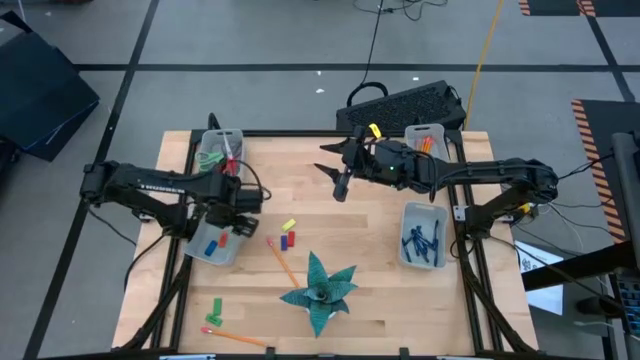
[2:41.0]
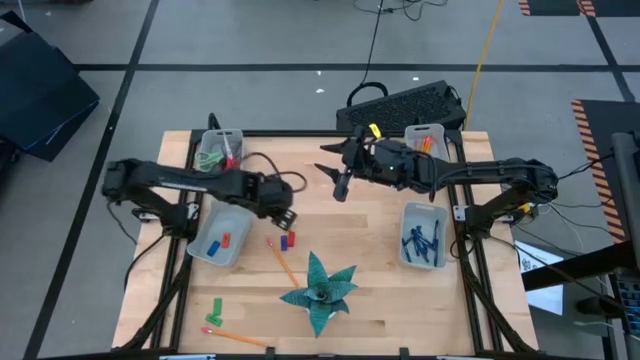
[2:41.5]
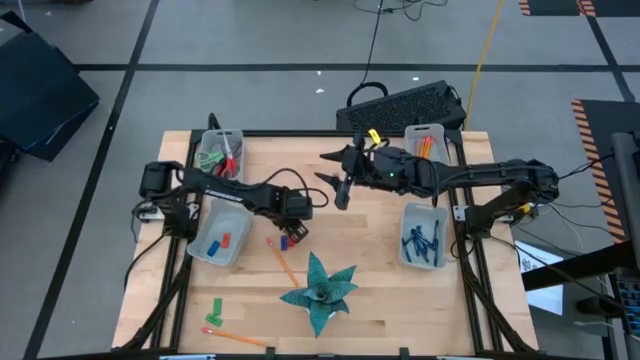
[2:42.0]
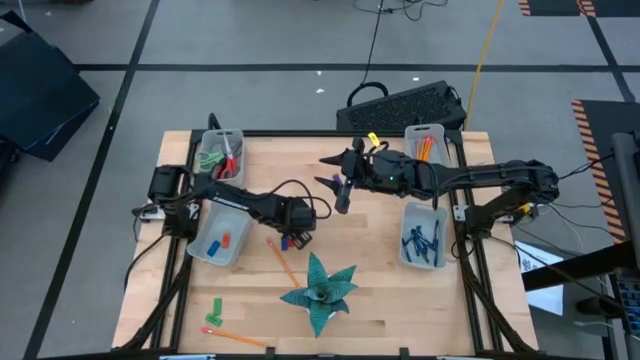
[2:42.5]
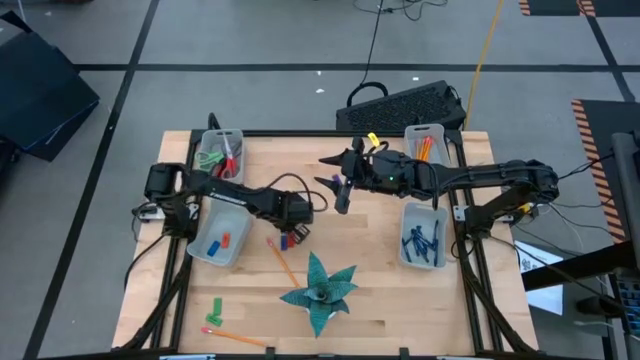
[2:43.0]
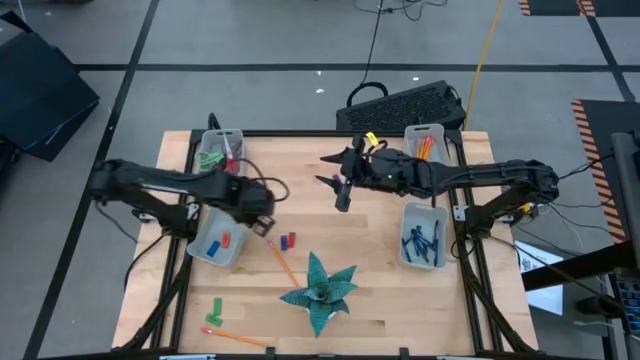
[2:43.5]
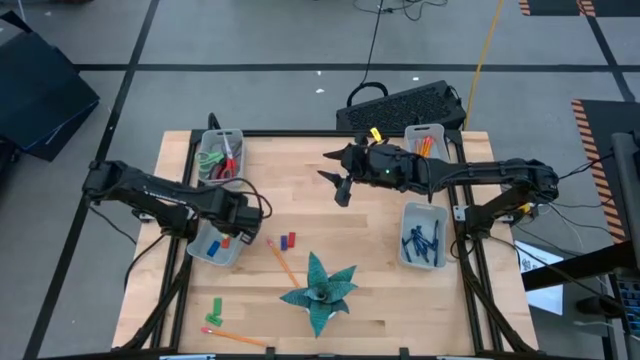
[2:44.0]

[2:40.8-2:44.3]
Task: Sort crayons/erasers/pens/pencils in bins
Put the light green eraser into the bottom left gray bin

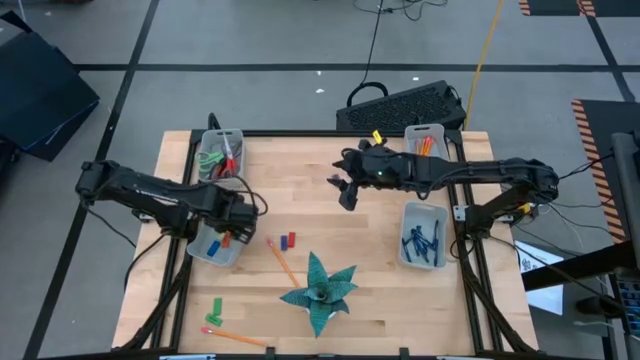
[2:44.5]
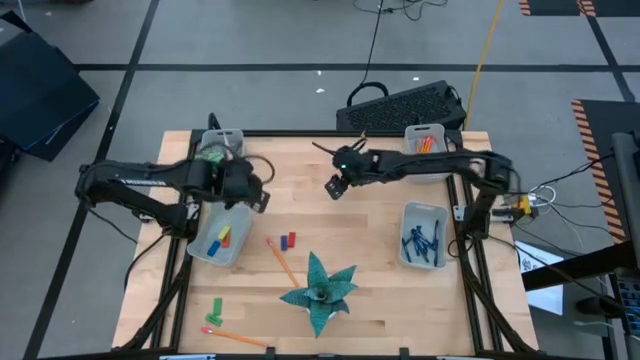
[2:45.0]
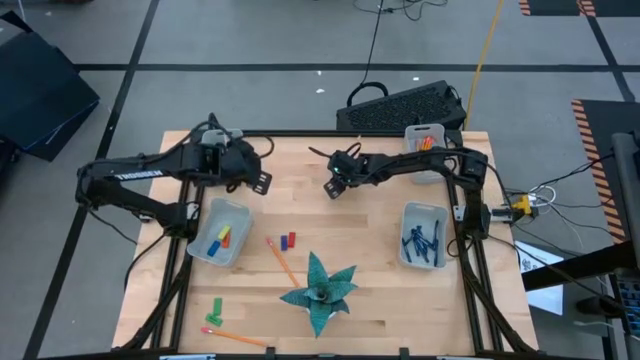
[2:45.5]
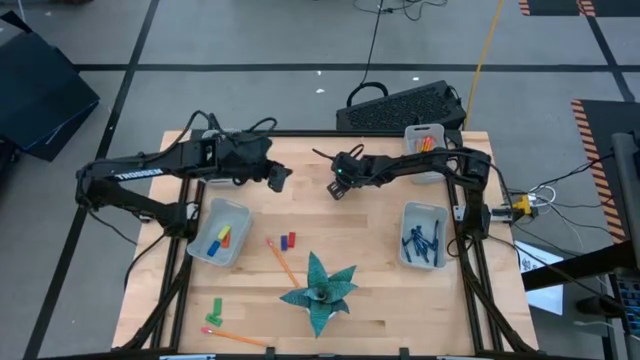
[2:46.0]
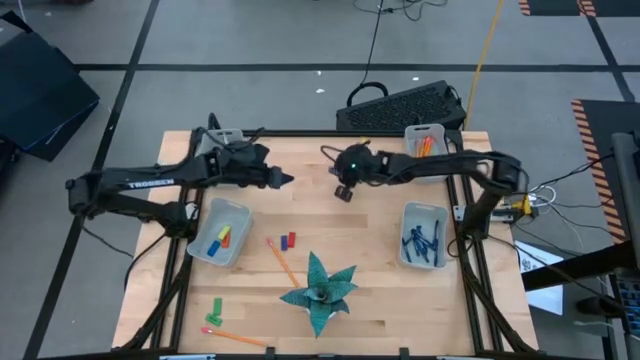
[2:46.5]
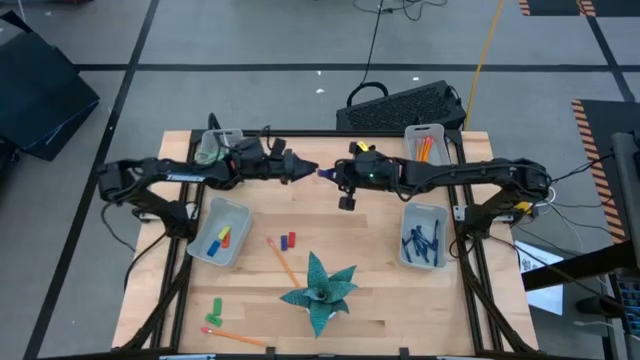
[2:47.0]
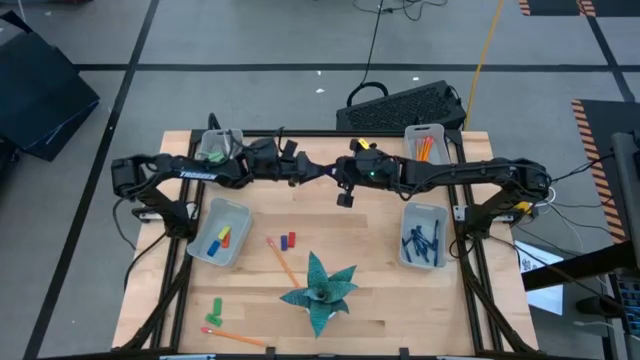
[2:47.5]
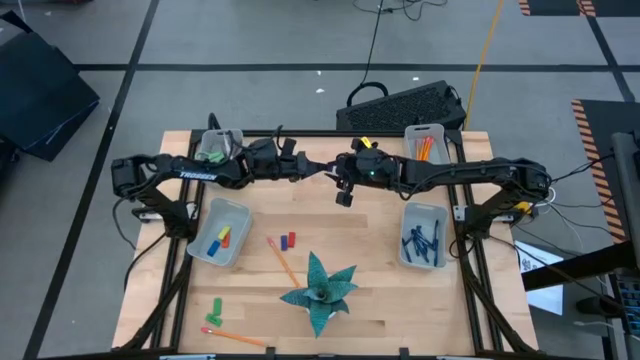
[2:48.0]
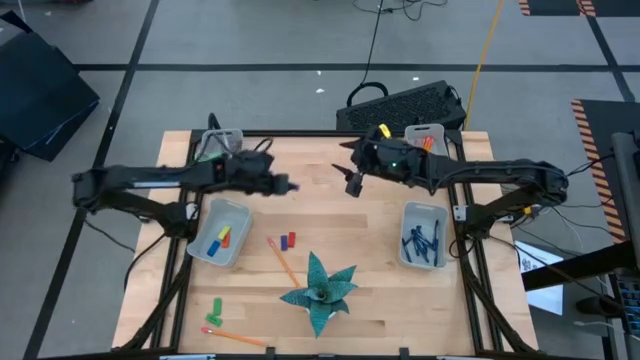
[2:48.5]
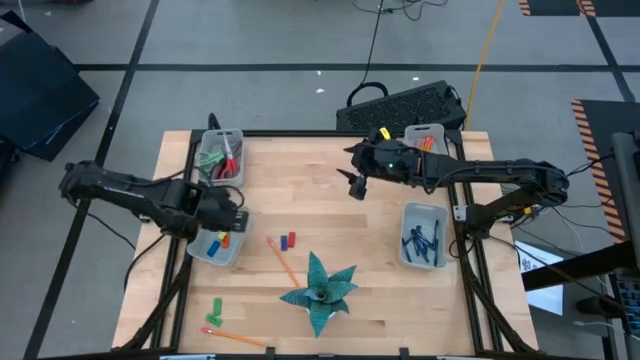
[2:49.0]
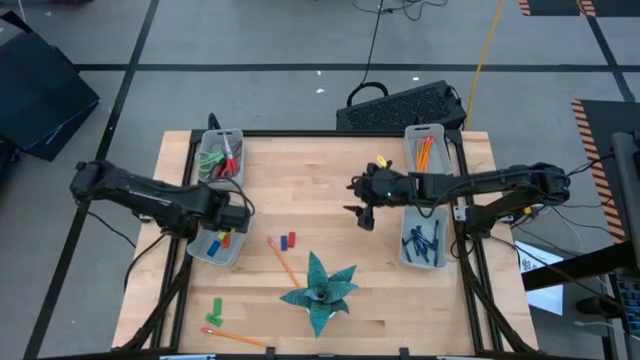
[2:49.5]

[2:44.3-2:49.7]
Put the blue eraser into the bottom left gray bin

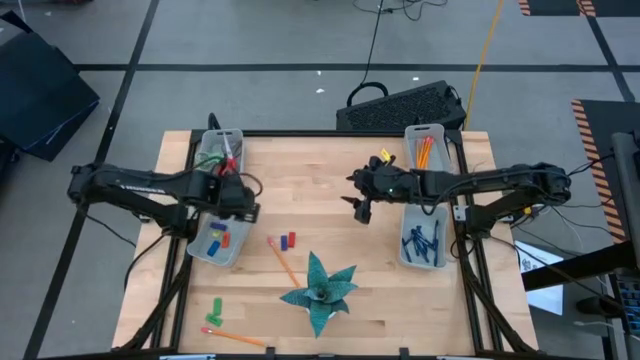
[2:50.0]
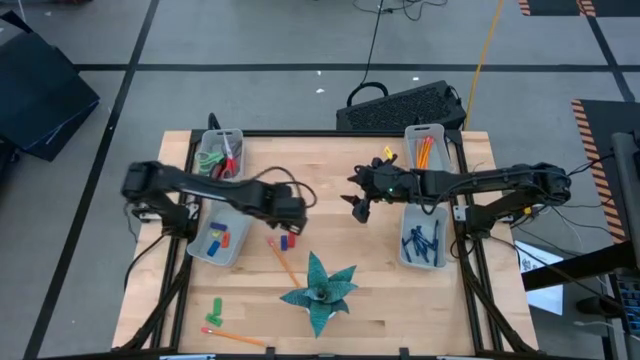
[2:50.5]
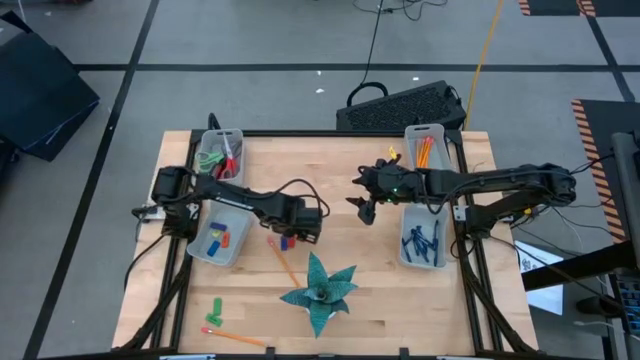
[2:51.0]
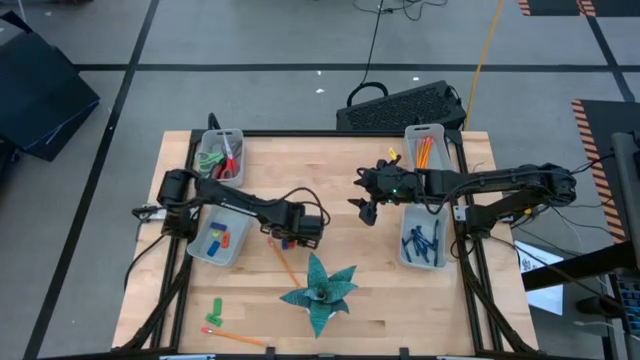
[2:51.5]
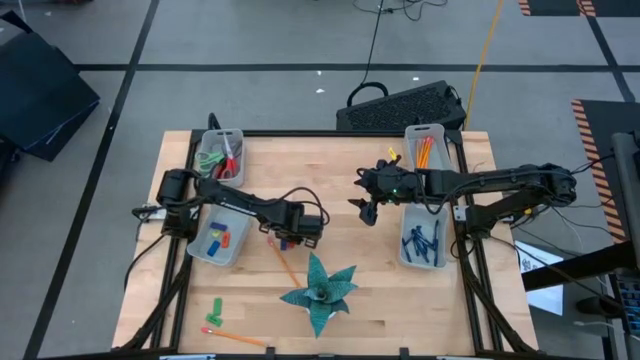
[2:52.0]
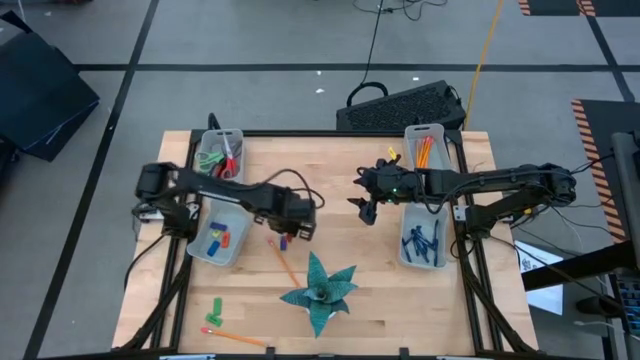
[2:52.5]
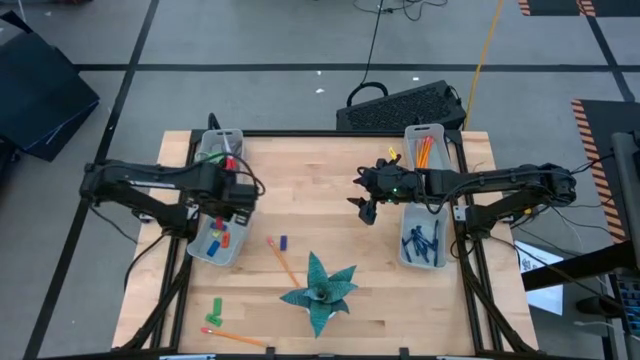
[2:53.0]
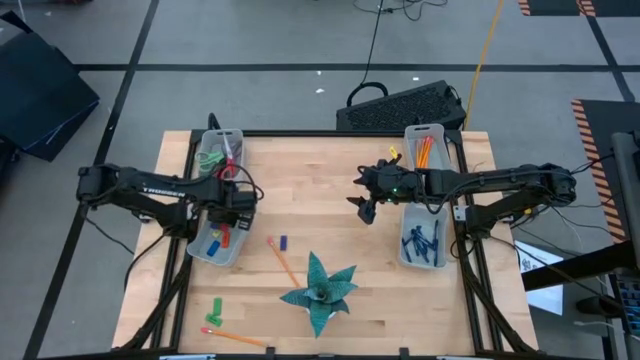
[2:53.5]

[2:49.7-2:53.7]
Put the red eraser into the bottom left gray bin

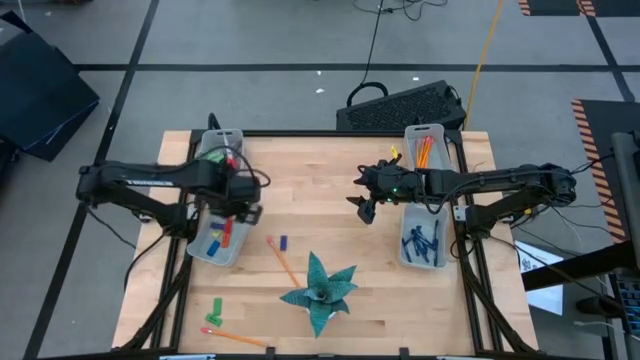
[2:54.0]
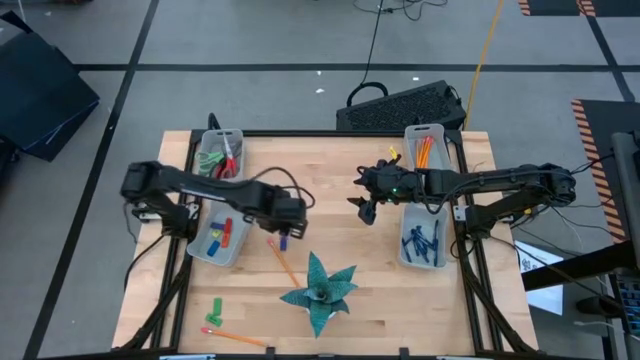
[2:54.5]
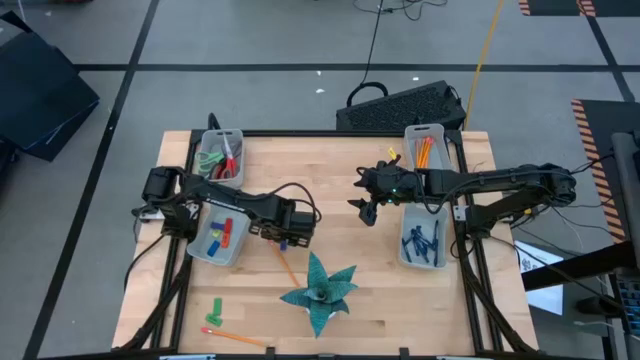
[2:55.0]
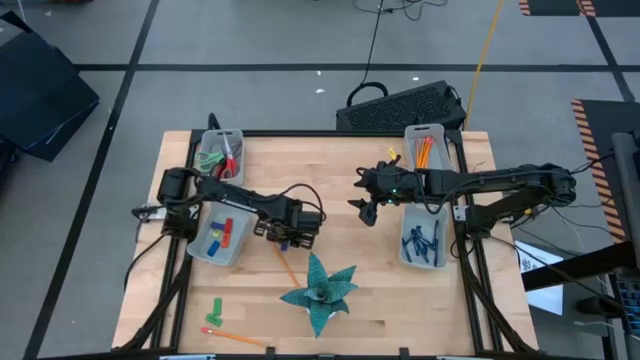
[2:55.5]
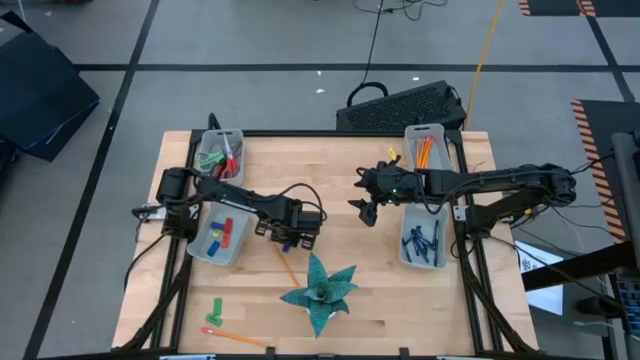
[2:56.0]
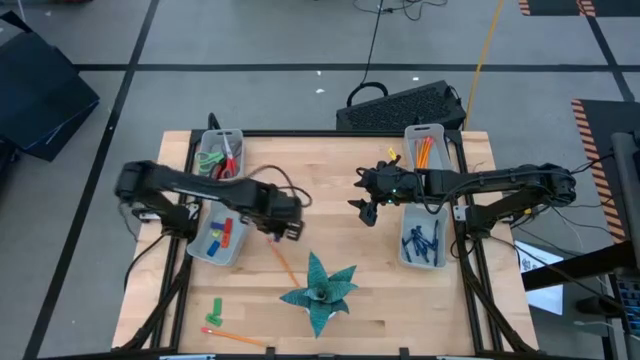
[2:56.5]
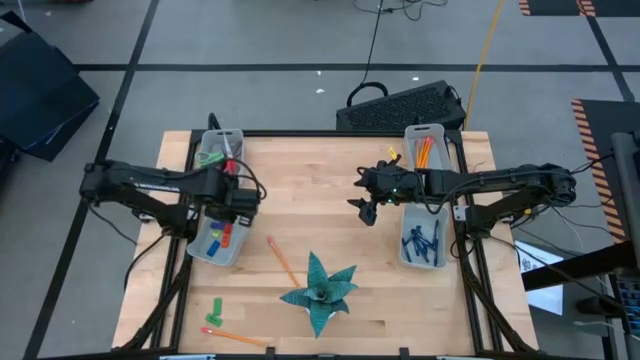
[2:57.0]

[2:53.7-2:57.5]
Put the blue eraser into the bottom left gray bin

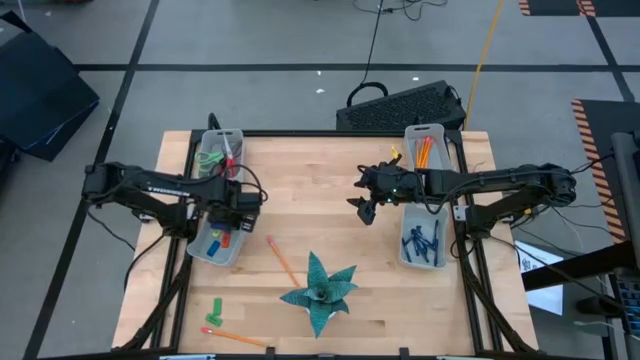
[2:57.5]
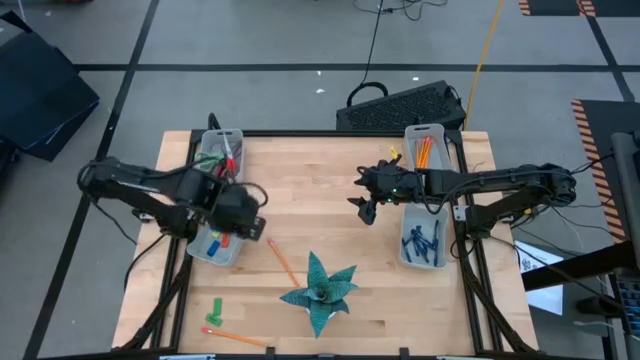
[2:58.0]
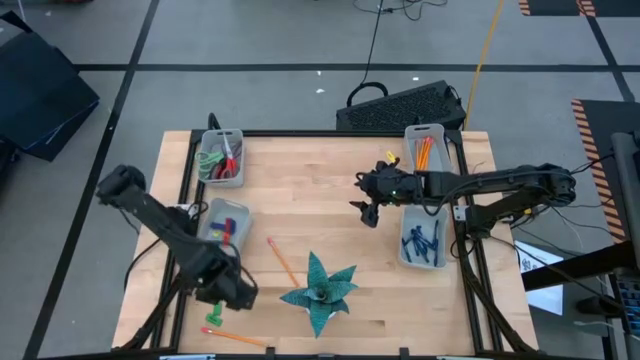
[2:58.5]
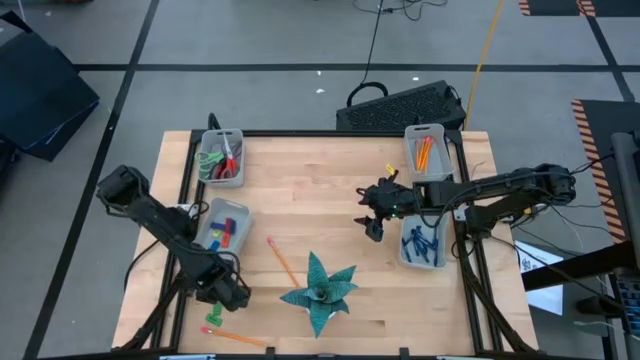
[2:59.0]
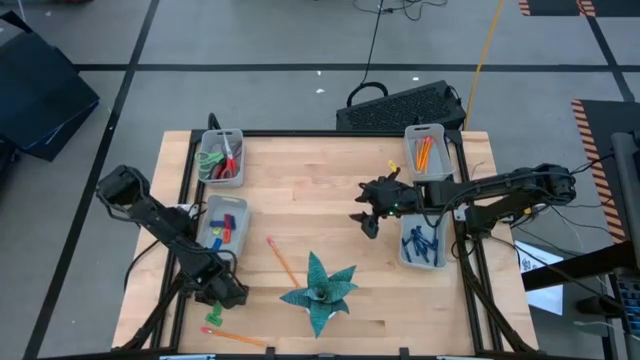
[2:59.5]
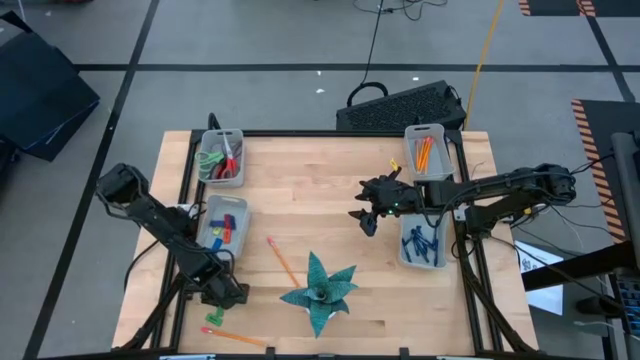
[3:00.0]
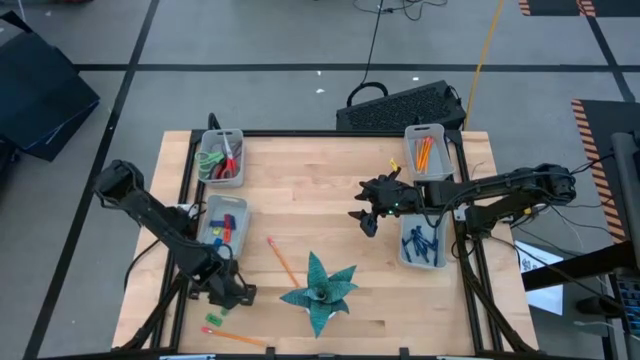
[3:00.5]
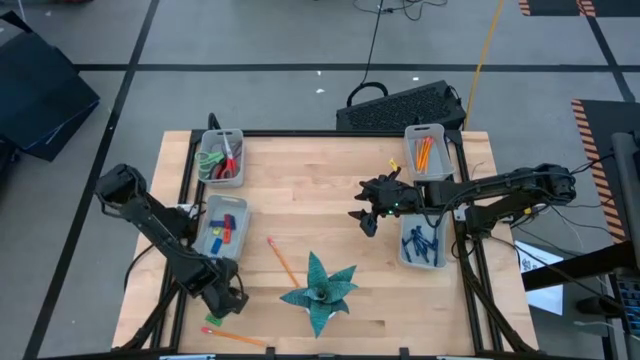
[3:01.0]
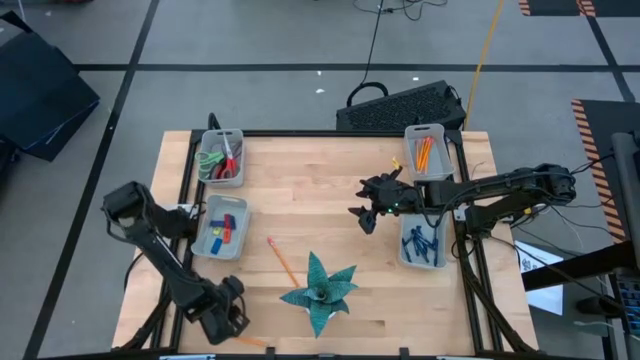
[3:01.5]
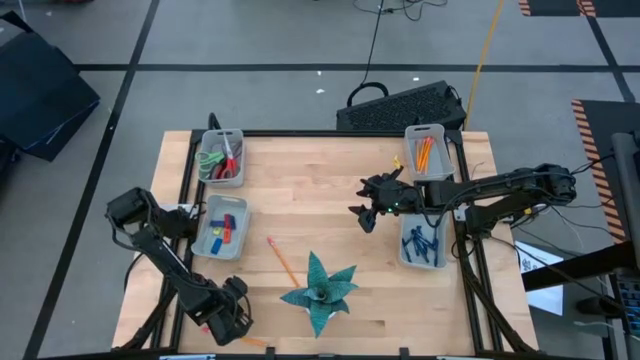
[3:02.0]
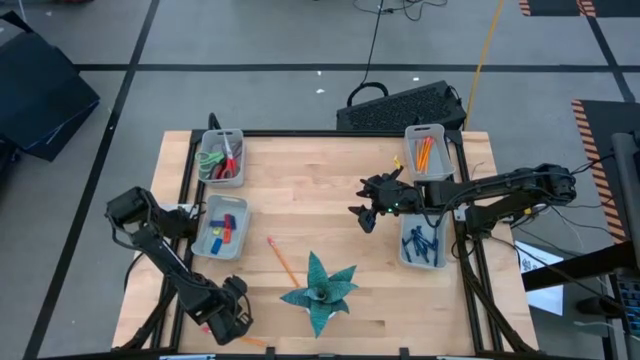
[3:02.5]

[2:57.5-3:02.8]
Put the top green eraser into the bottom left gray bin
